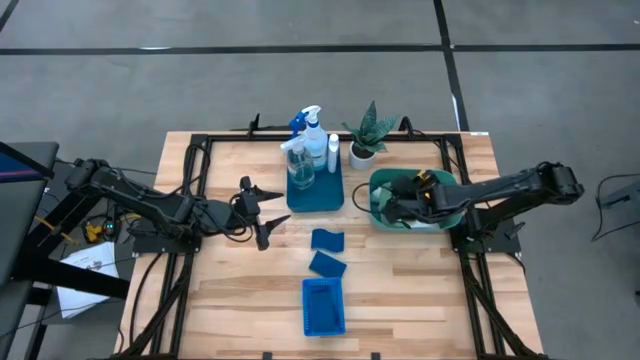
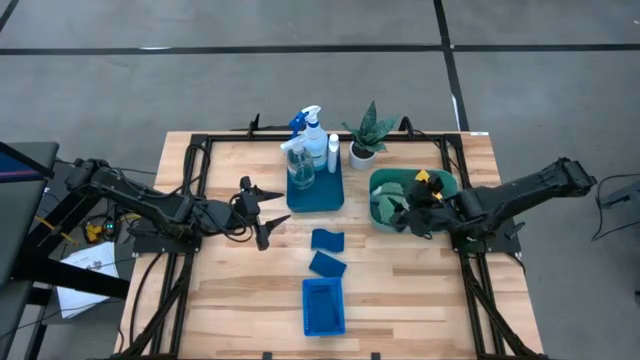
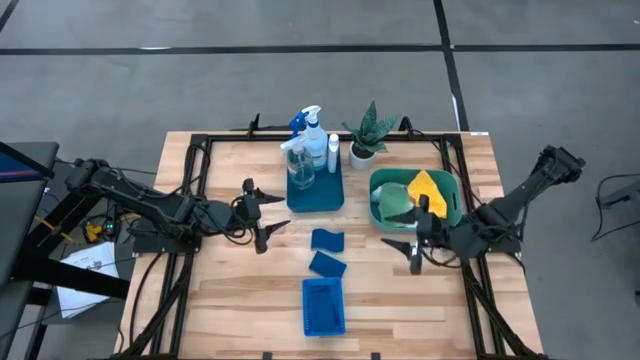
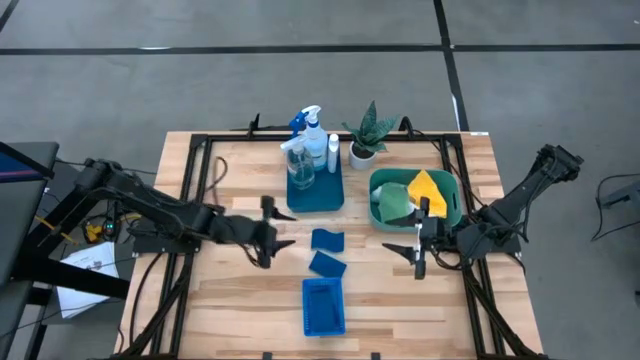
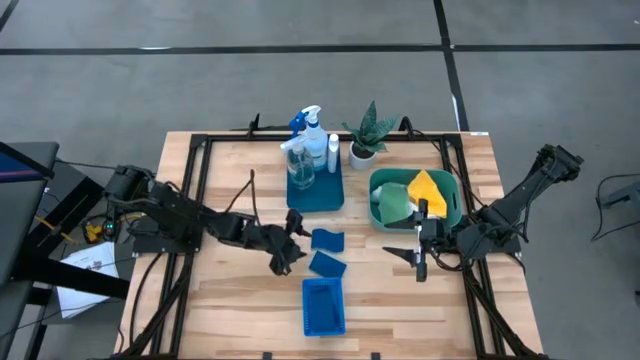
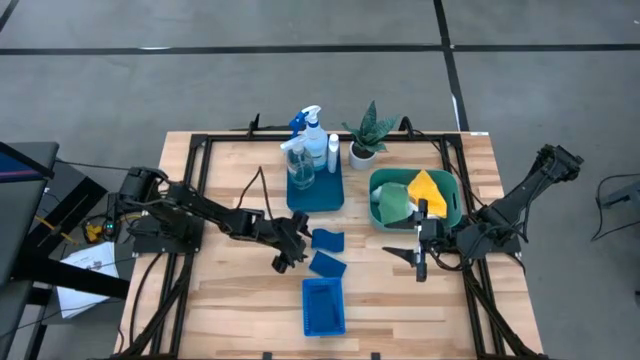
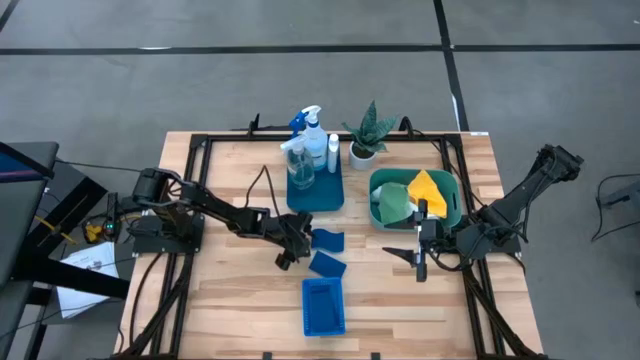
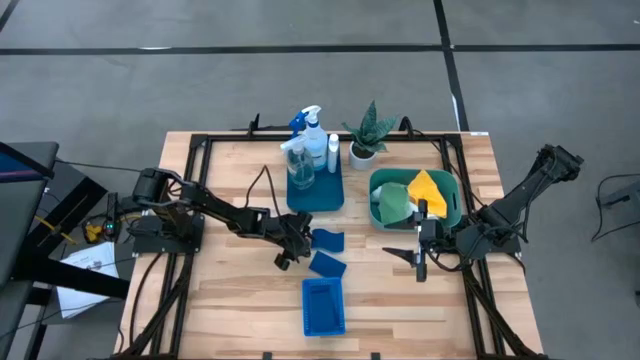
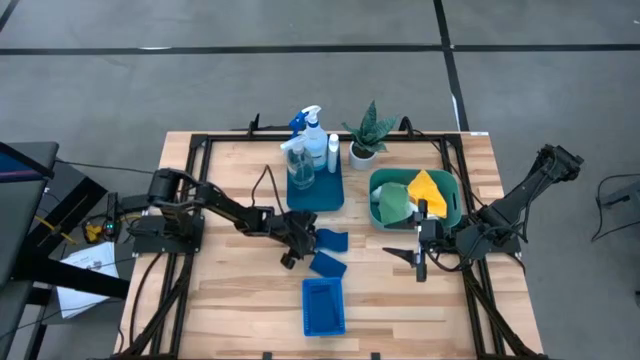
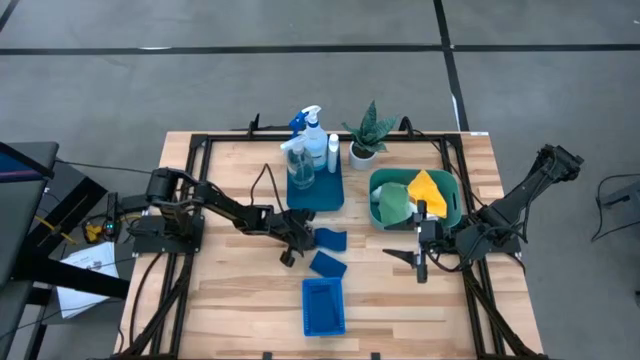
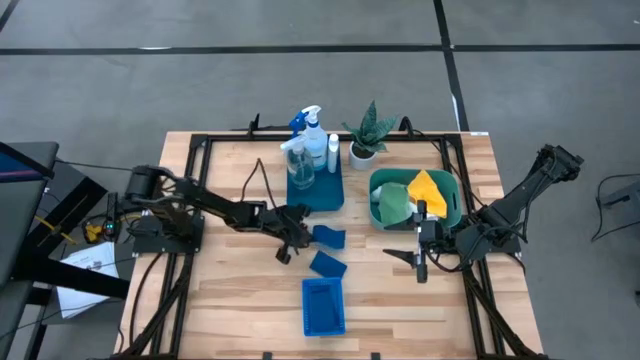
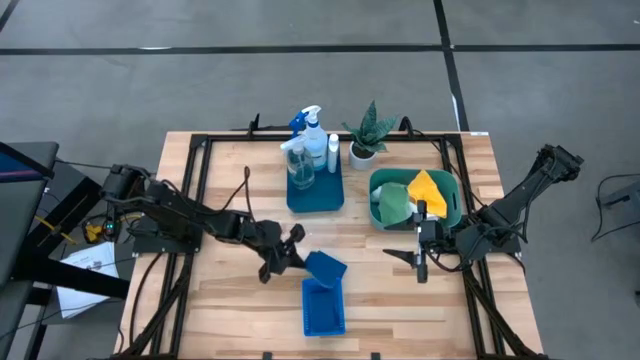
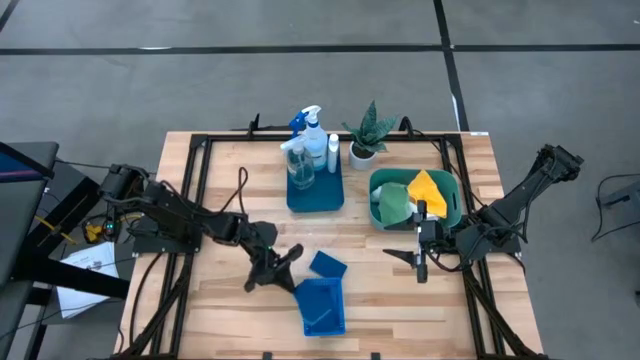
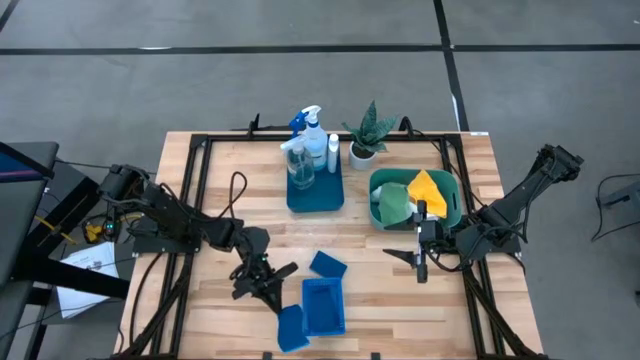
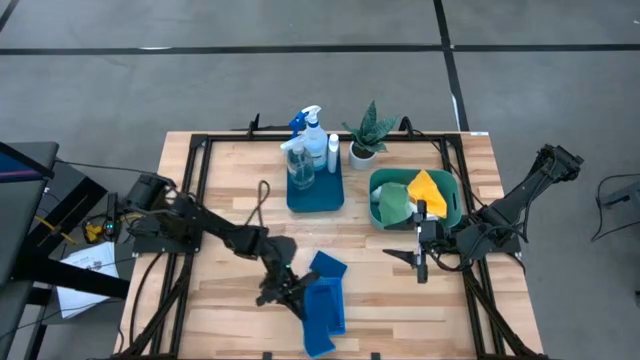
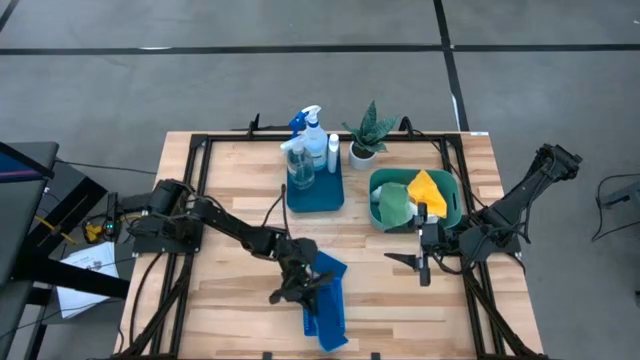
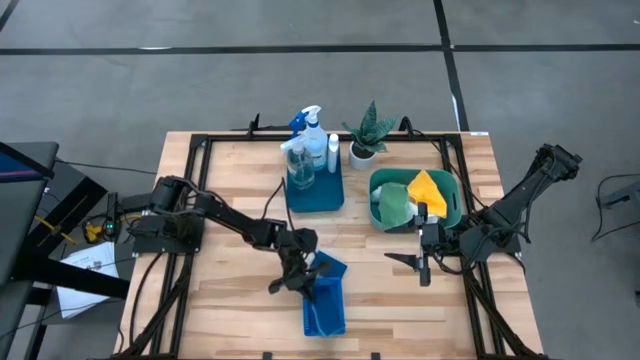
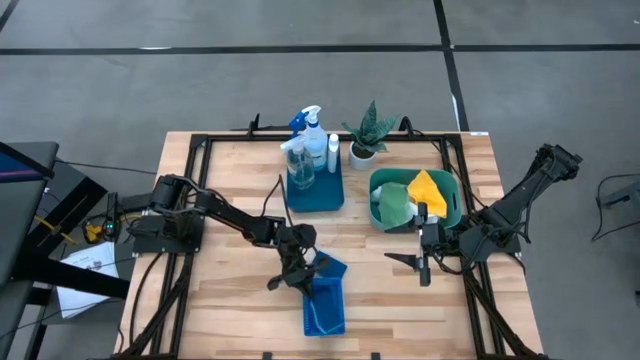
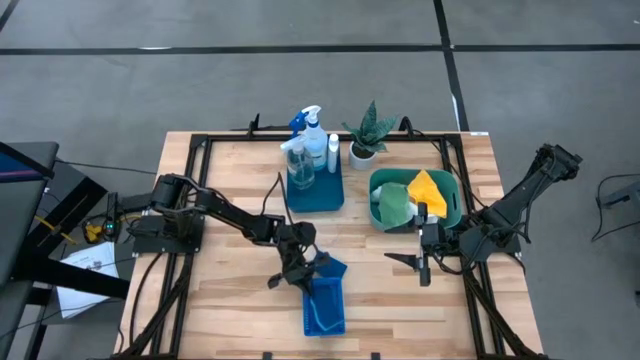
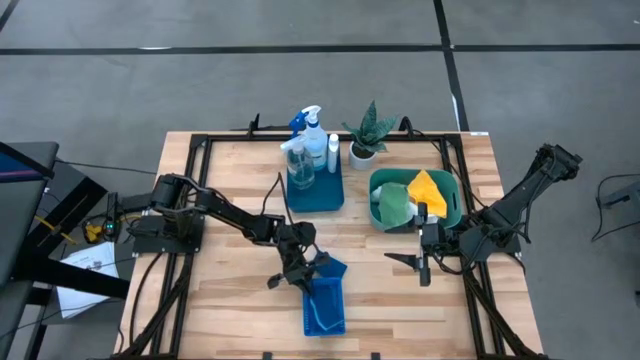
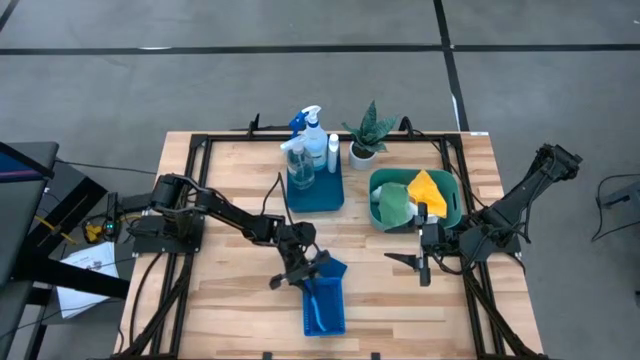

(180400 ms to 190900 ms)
Task: Pick & Place Kitchen Items
Put the blue sponge into the blue basket

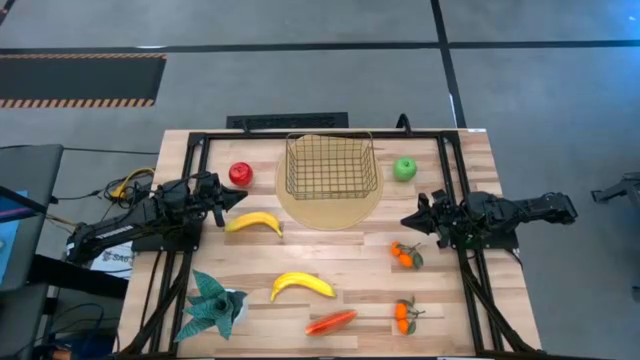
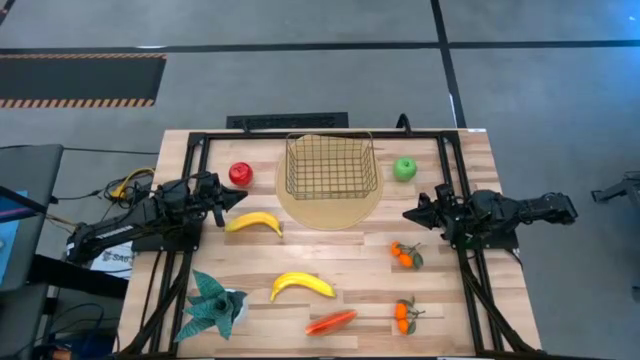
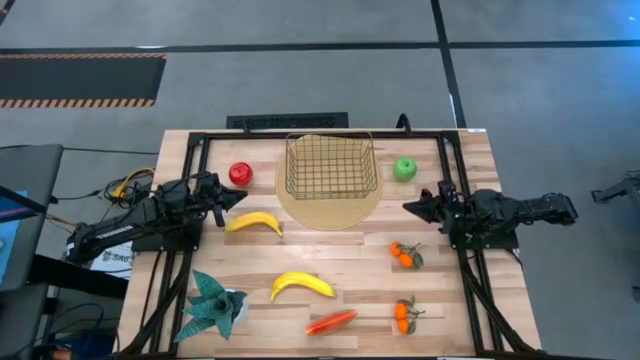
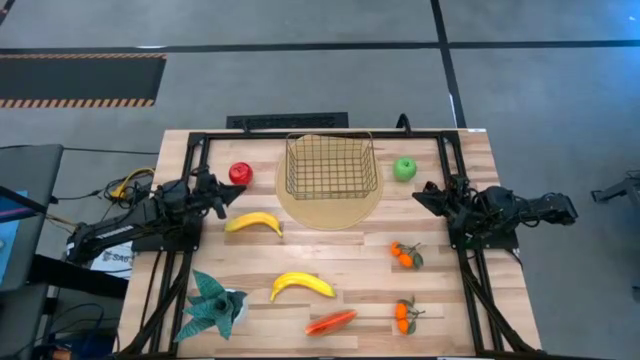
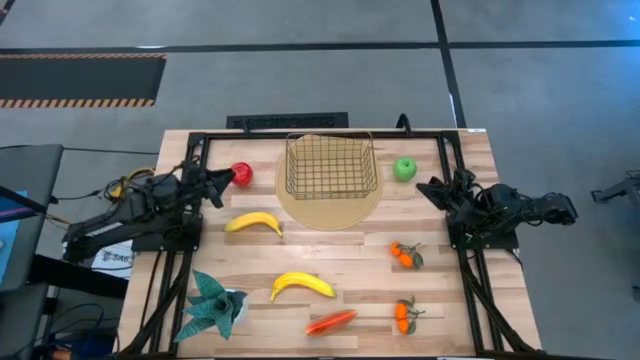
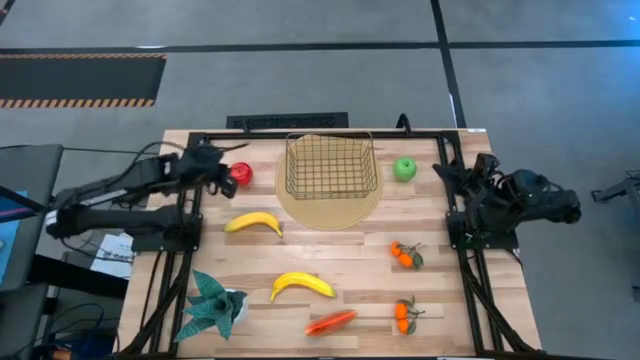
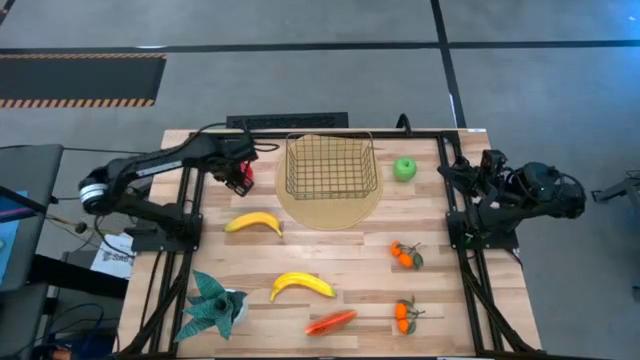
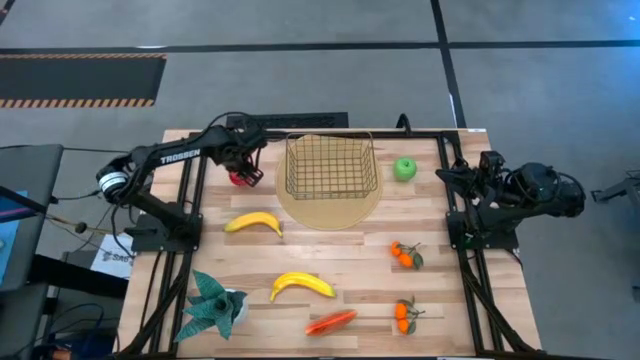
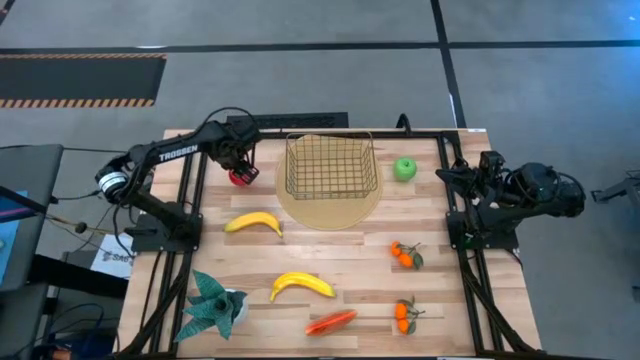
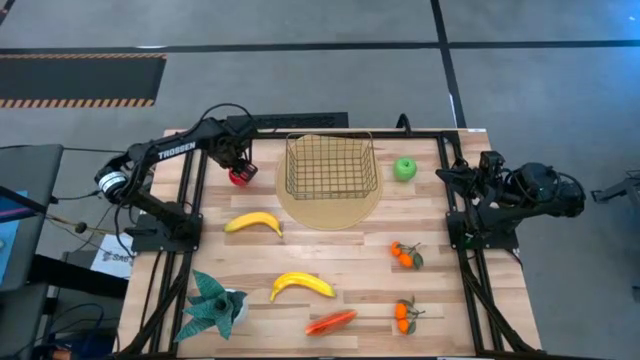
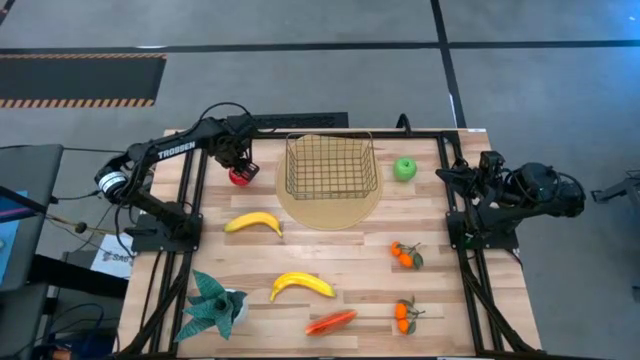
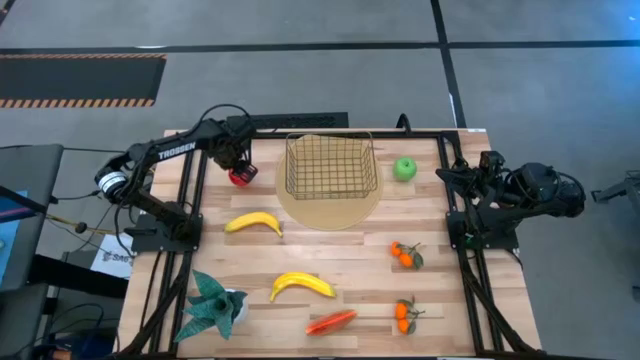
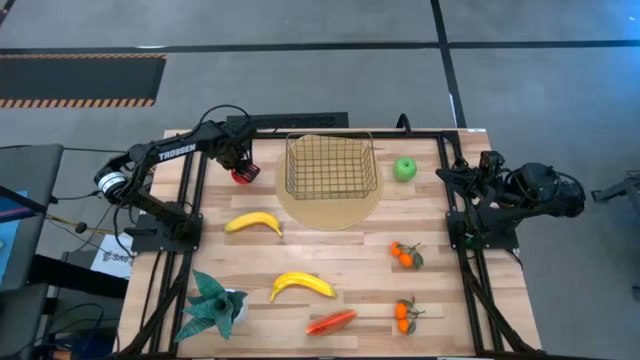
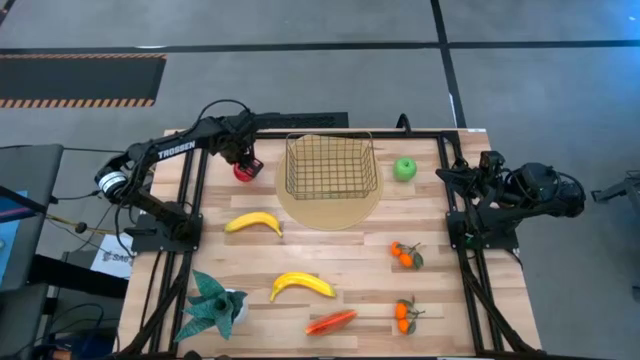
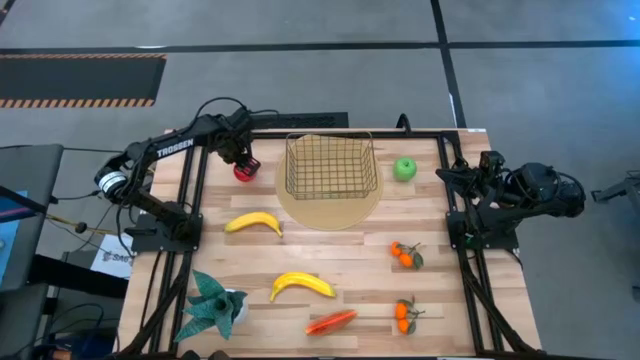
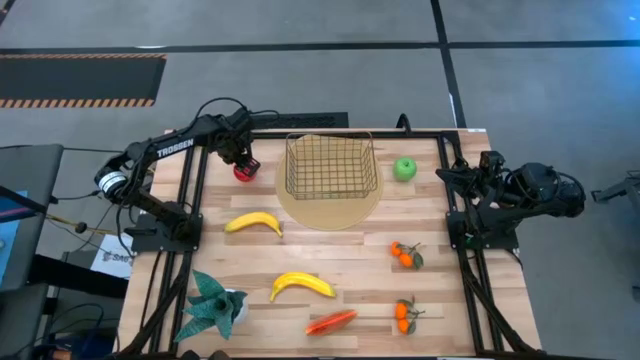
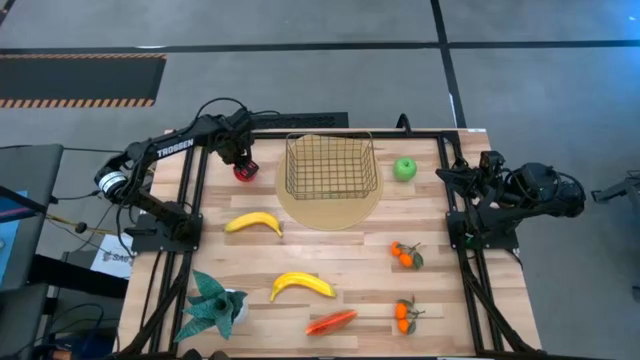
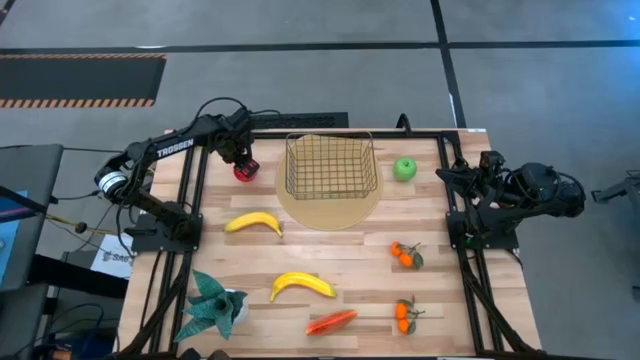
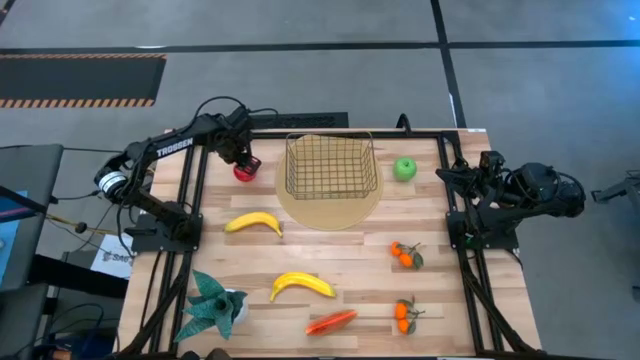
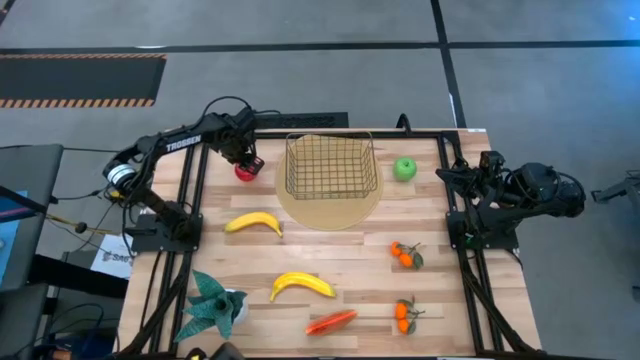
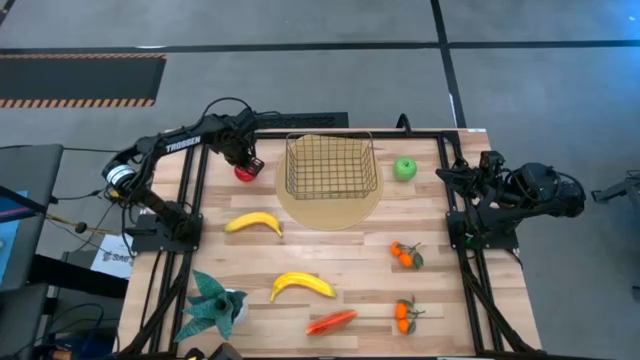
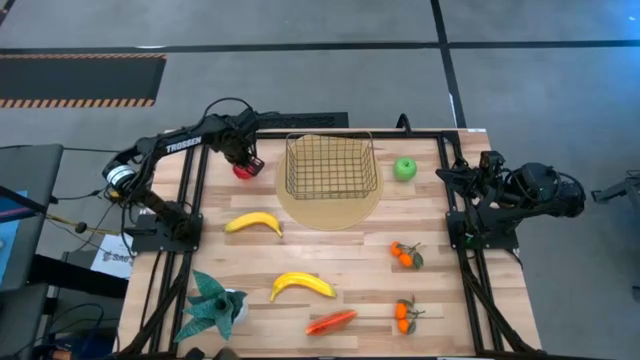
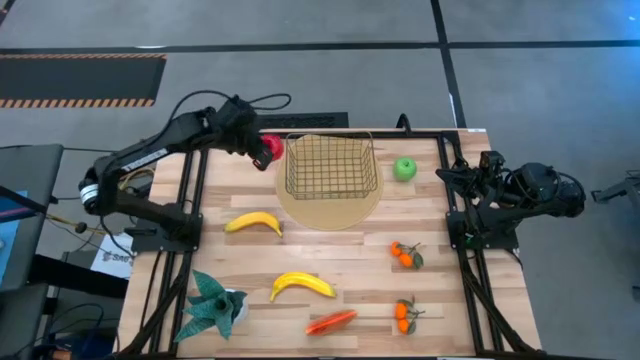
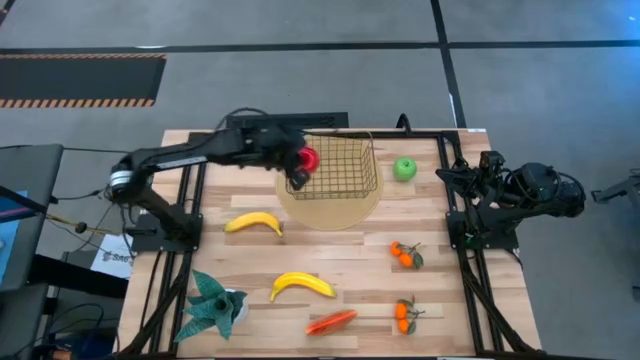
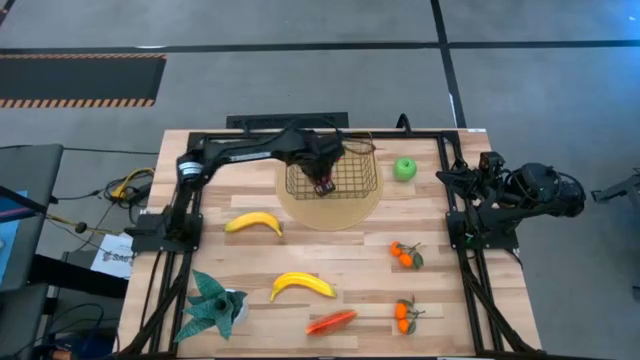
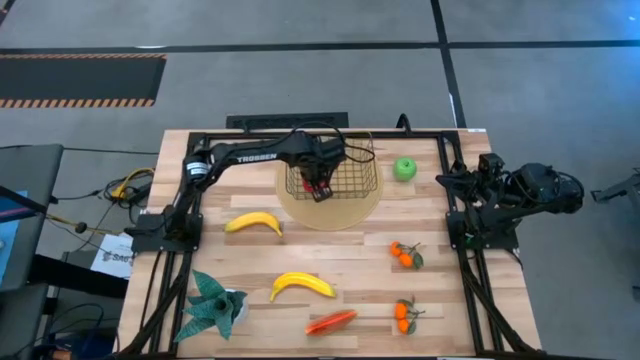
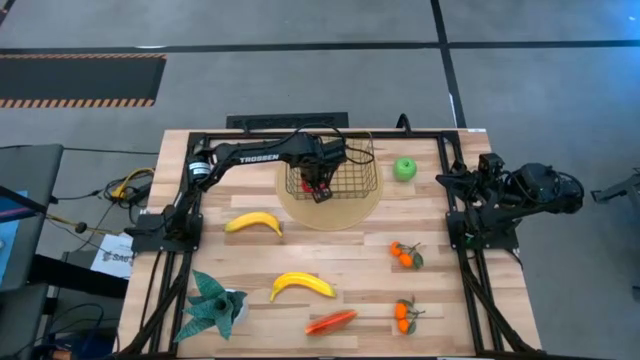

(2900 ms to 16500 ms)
Task: Build produce basket
Put the red apple into the basket
